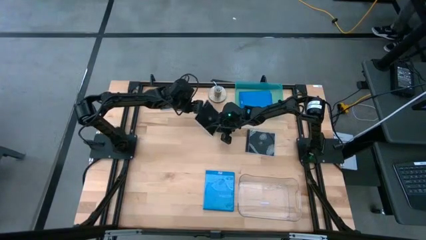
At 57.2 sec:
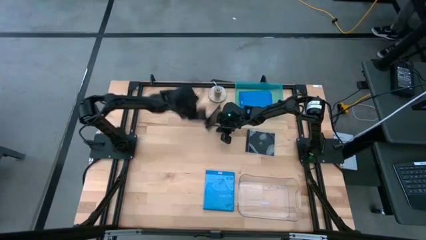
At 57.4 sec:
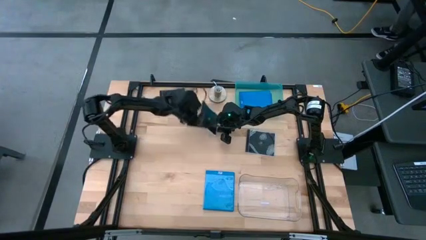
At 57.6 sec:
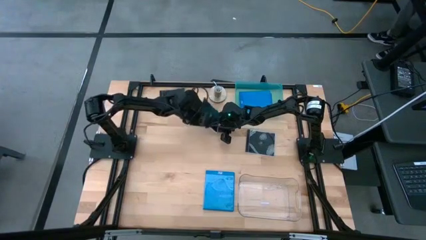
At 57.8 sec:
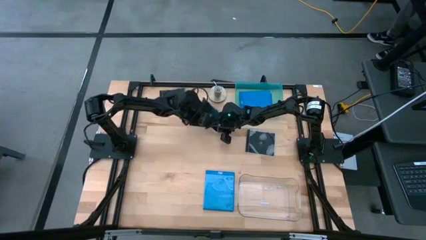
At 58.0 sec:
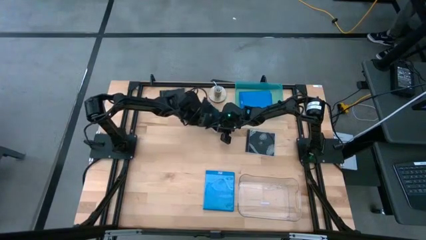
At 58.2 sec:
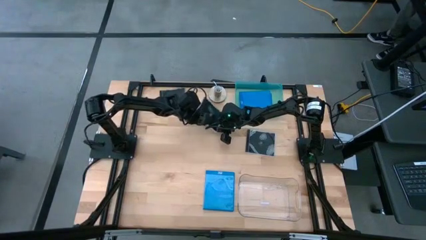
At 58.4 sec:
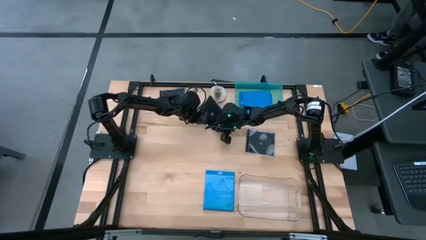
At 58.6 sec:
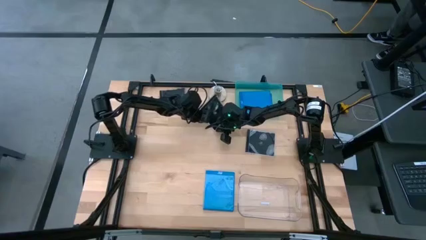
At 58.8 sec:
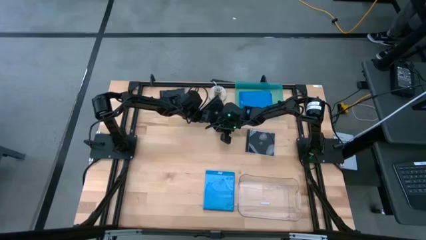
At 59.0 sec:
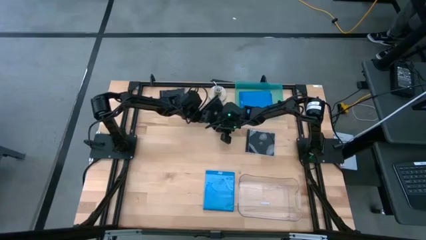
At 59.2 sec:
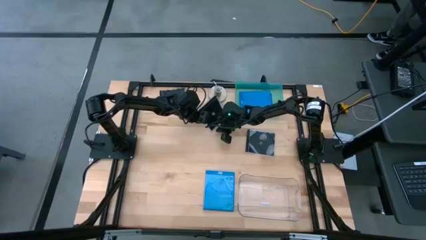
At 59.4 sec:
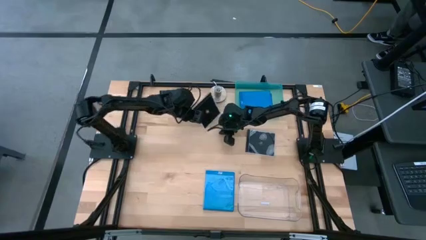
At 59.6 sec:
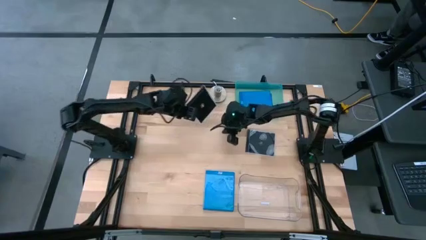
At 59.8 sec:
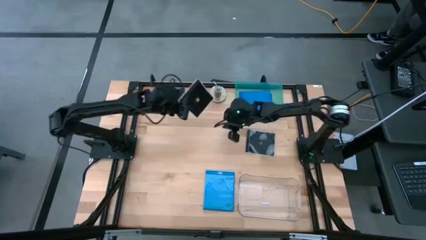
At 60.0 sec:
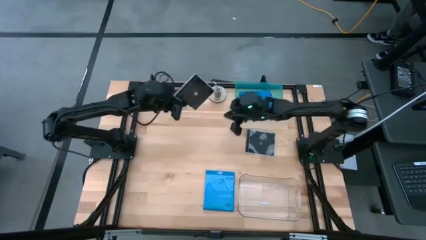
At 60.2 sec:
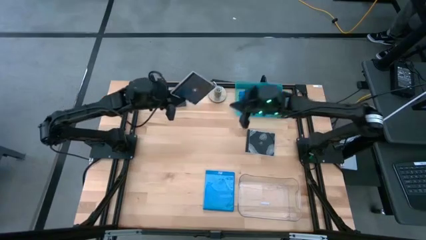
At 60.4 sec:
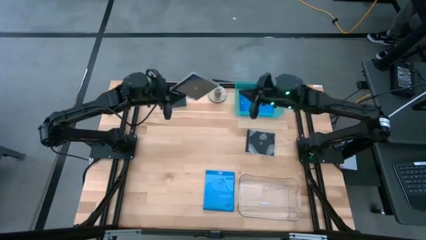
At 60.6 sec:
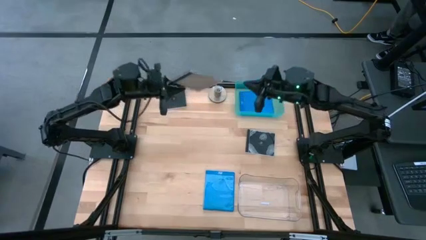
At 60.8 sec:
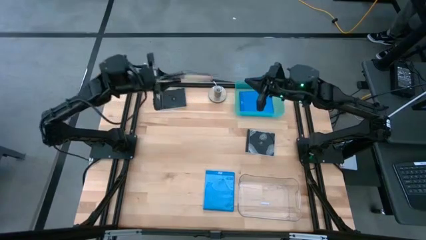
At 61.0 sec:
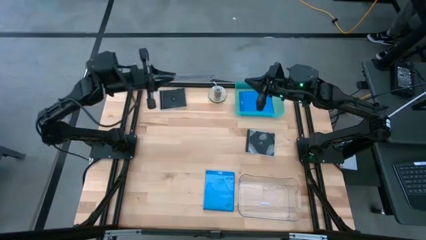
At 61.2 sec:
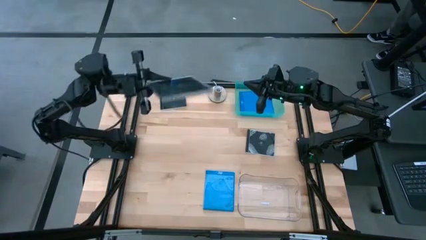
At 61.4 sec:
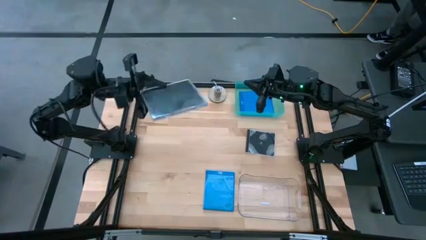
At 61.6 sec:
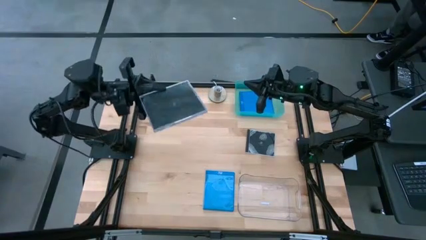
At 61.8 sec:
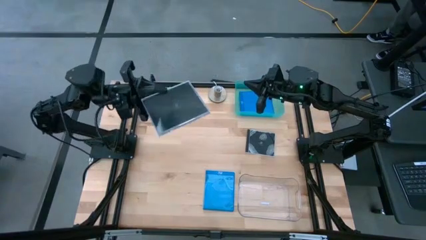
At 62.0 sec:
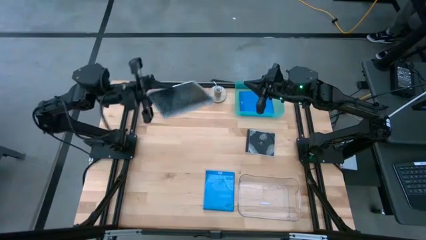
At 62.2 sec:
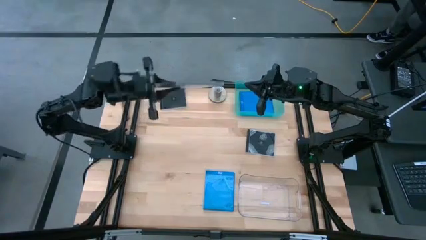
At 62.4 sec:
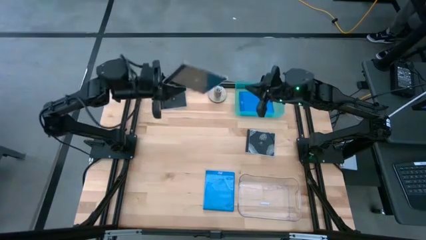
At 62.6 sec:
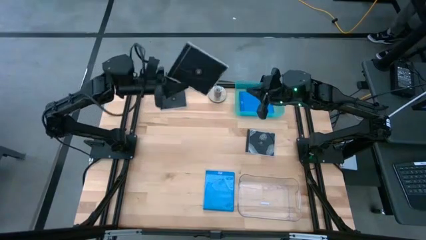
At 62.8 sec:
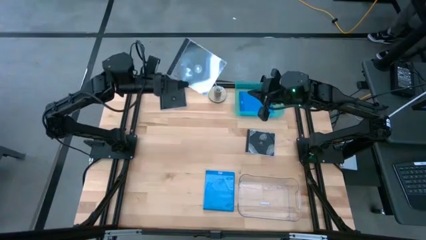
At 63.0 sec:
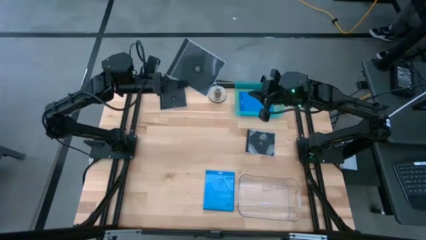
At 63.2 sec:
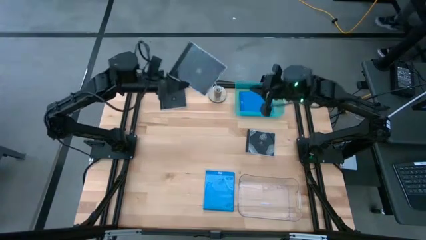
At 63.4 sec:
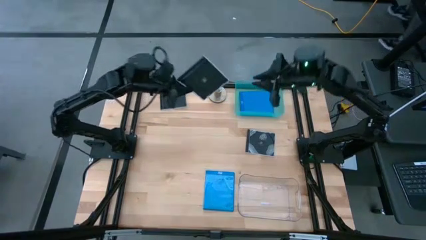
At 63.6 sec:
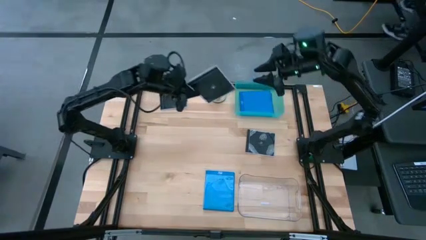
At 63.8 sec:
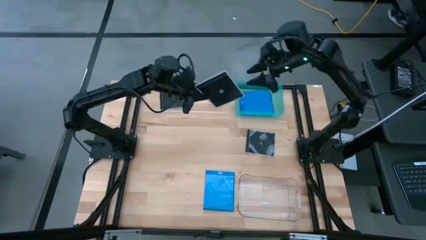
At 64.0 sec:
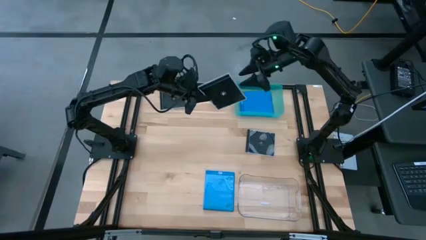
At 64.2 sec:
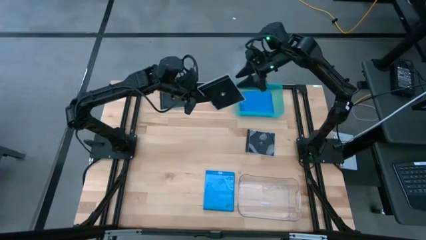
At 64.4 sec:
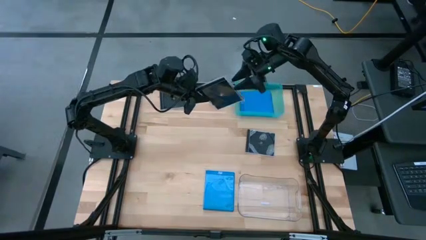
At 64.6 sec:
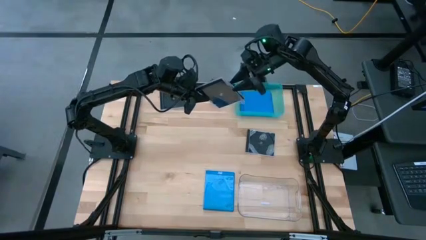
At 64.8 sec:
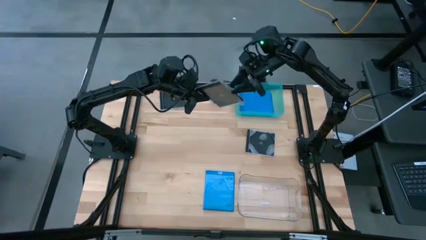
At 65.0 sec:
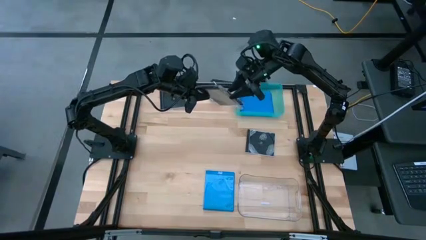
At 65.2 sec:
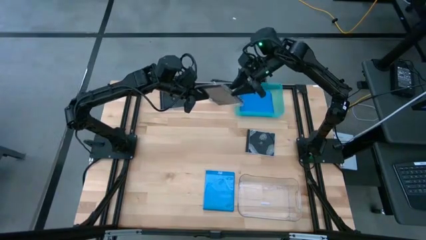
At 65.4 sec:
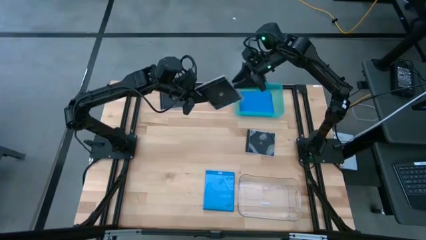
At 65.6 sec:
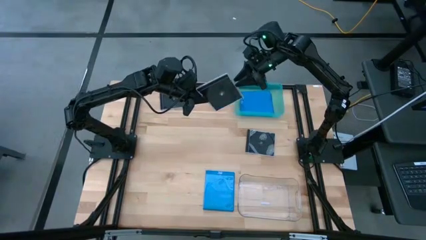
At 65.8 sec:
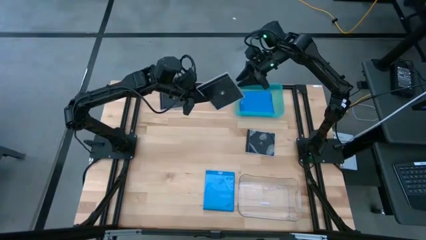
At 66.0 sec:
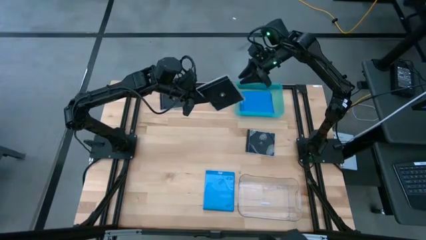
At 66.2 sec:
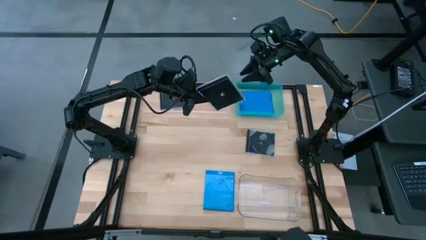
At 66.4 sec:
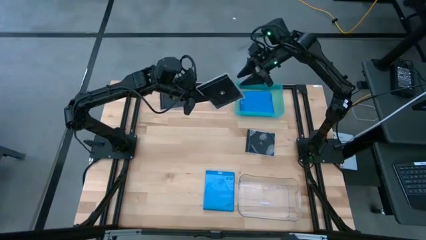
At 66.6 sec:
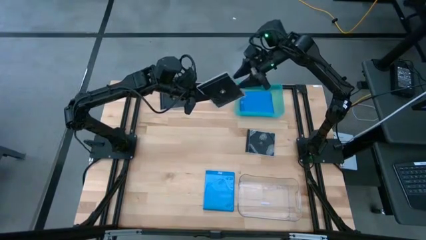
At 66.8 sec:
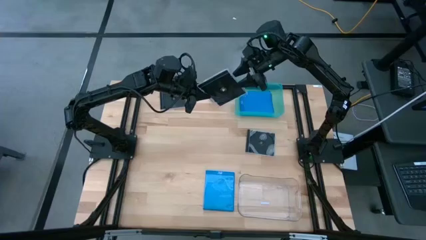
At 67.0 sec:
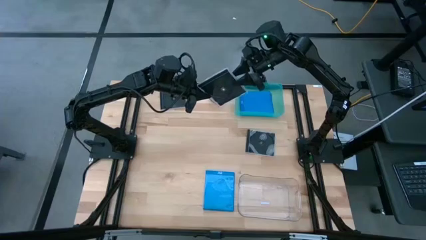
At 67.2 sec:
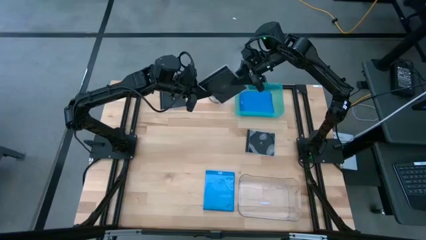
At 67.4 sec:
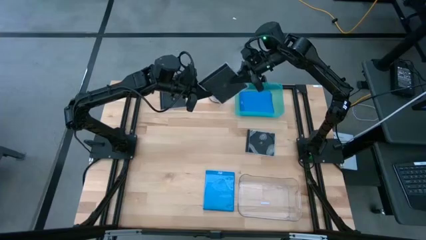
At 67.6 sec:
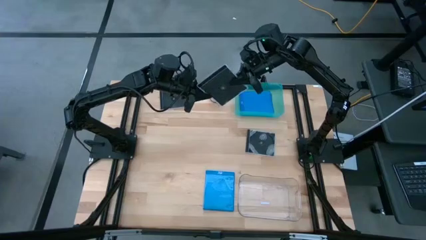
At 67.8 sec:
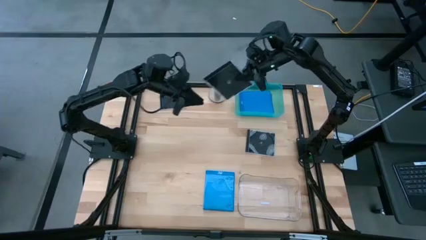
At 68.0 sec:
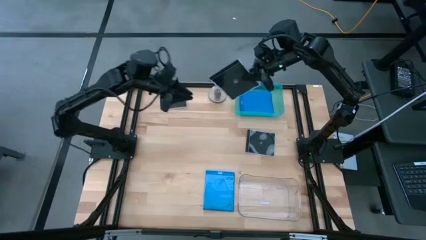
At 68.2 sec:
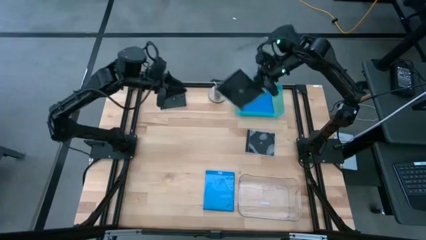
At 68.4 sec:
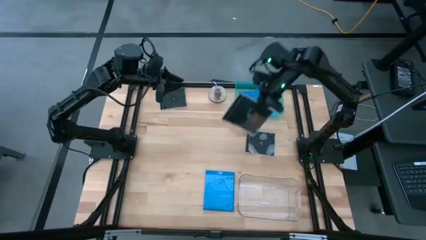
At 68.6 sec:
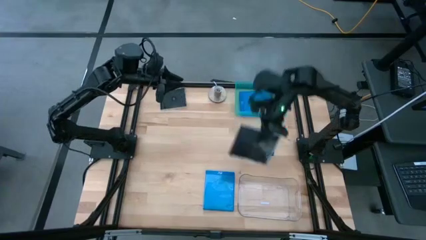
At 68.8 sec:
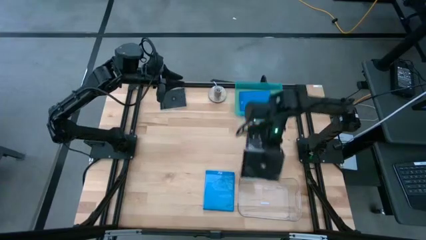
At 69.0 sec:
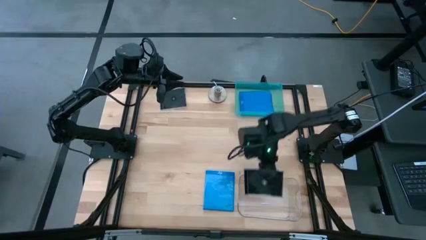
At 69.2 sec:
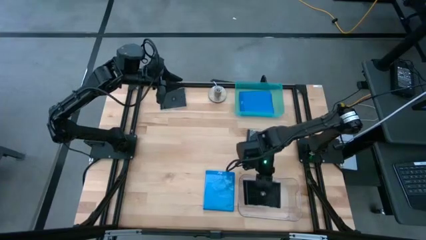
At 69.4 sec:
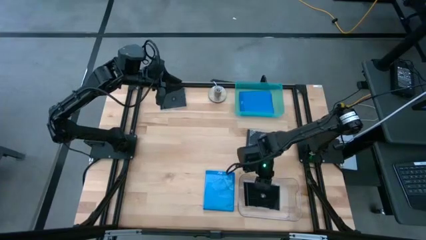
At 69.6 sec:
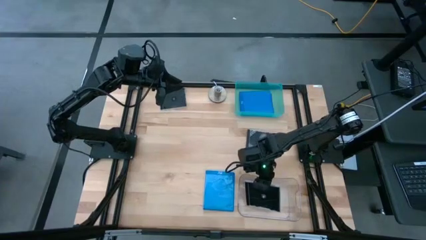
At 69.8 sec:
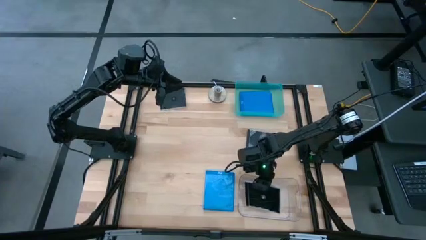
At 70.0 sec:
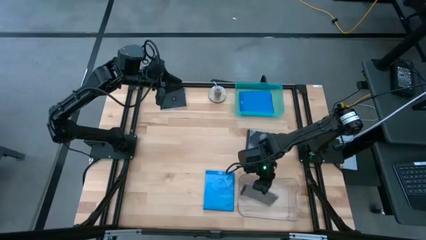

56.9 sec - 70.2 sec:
Task: Pick & place jewel cases by type
Put the middle black CD case into the transparent bin
